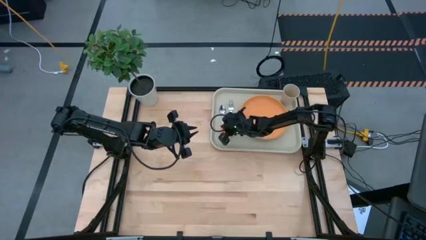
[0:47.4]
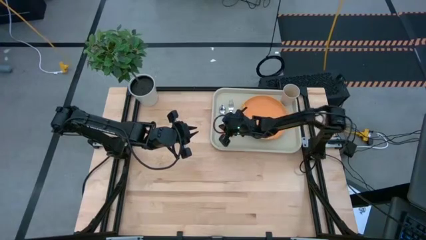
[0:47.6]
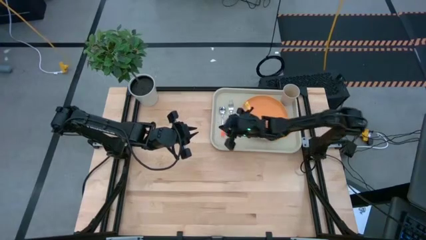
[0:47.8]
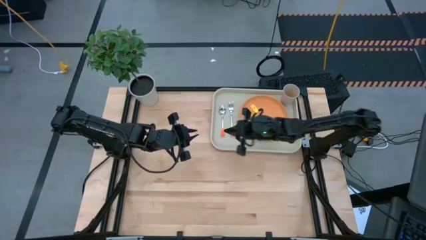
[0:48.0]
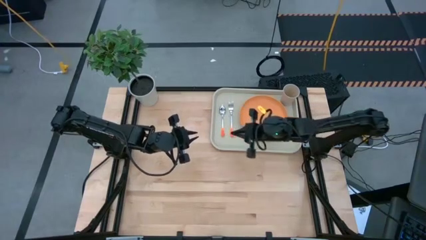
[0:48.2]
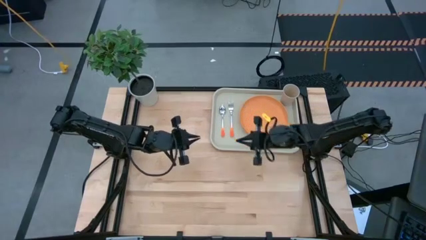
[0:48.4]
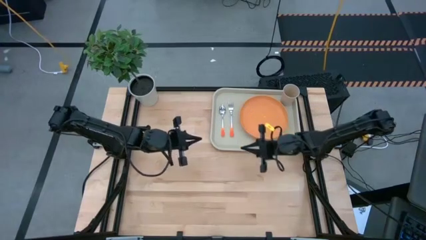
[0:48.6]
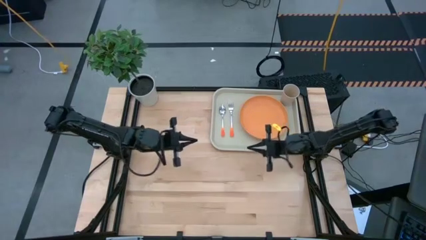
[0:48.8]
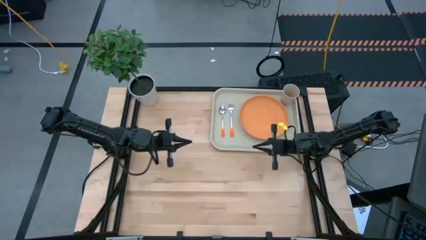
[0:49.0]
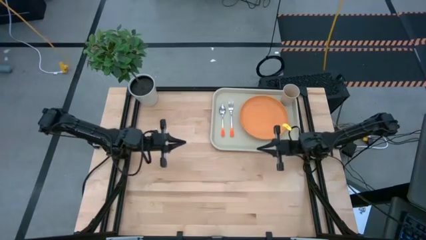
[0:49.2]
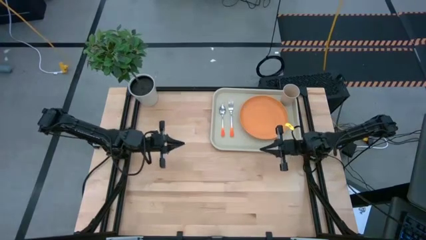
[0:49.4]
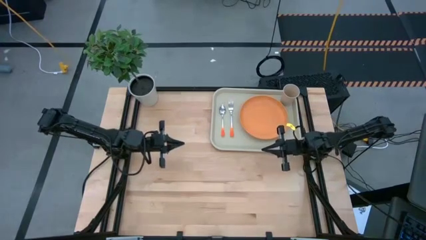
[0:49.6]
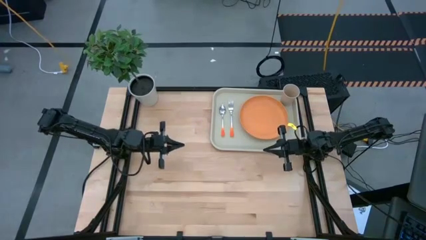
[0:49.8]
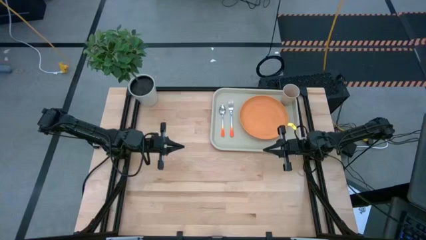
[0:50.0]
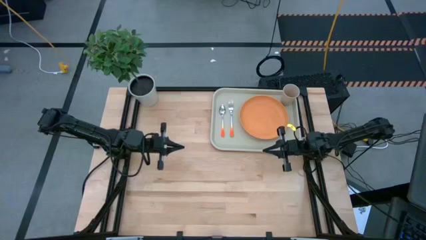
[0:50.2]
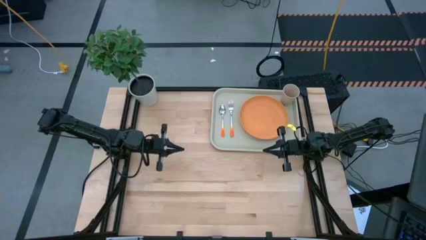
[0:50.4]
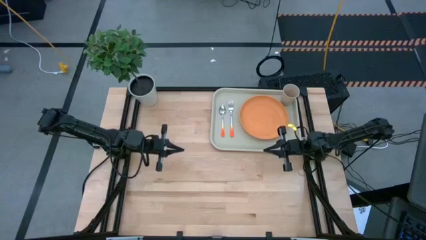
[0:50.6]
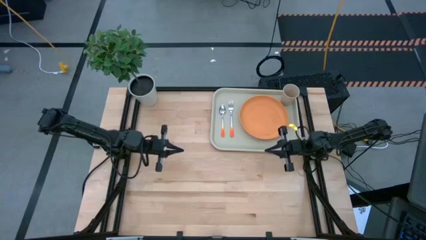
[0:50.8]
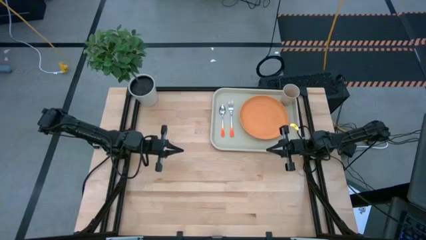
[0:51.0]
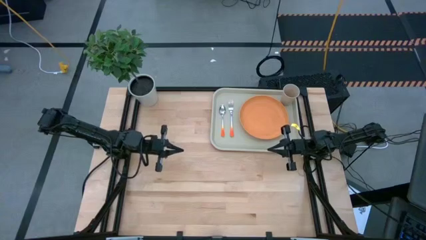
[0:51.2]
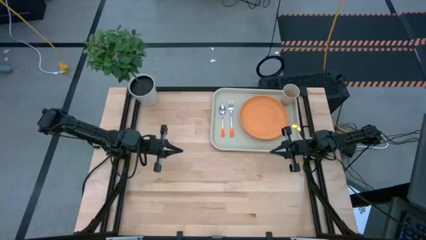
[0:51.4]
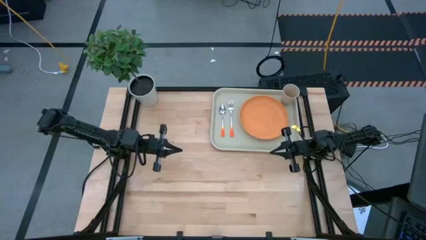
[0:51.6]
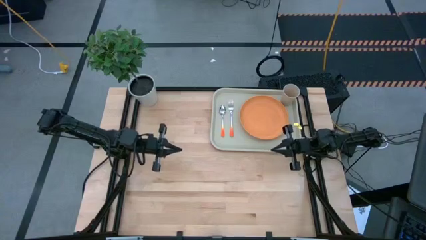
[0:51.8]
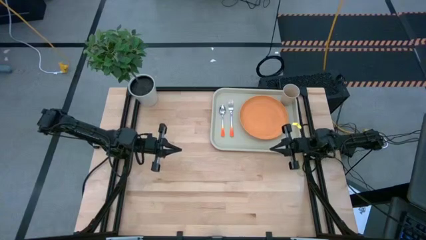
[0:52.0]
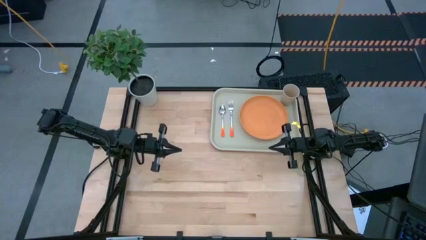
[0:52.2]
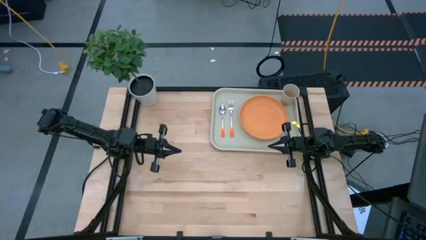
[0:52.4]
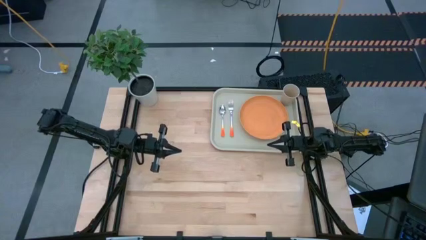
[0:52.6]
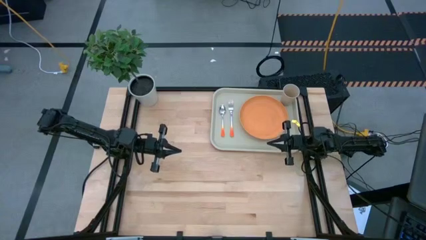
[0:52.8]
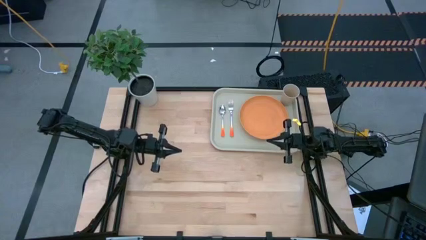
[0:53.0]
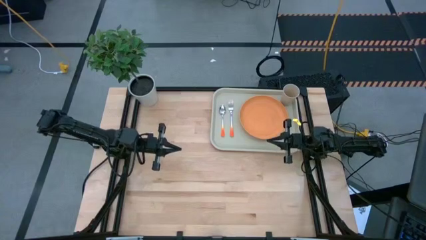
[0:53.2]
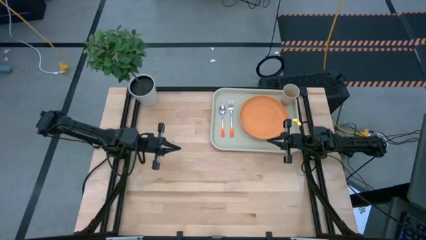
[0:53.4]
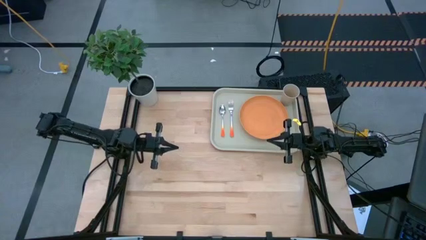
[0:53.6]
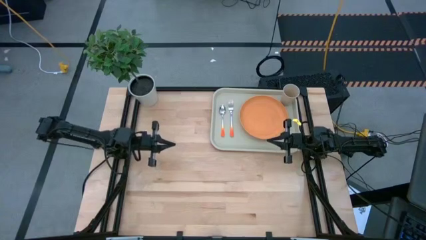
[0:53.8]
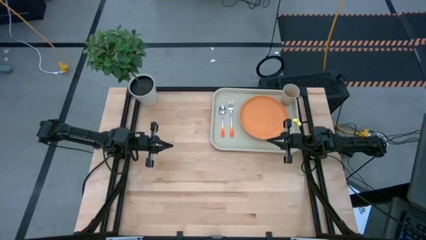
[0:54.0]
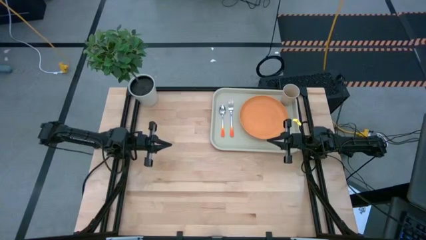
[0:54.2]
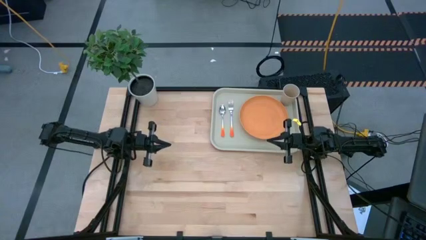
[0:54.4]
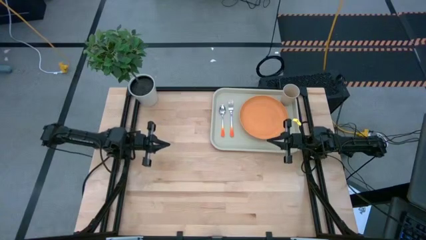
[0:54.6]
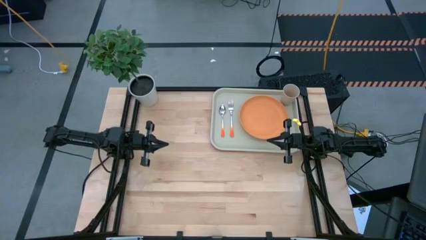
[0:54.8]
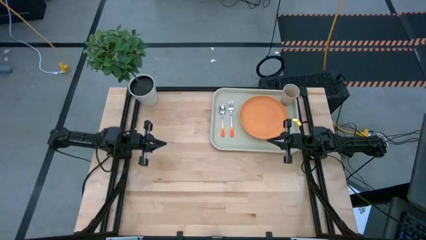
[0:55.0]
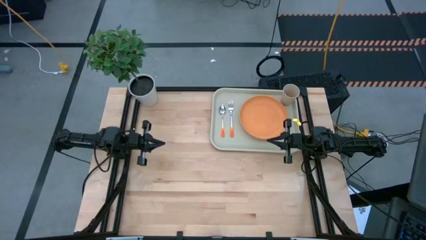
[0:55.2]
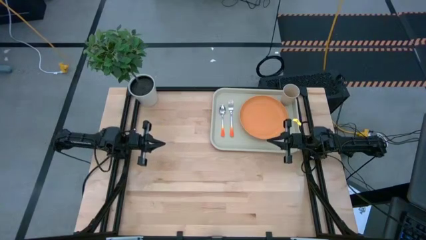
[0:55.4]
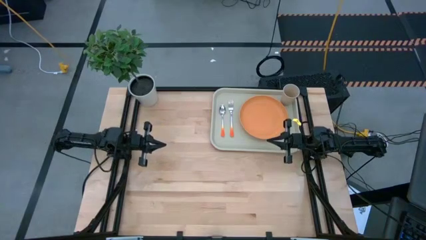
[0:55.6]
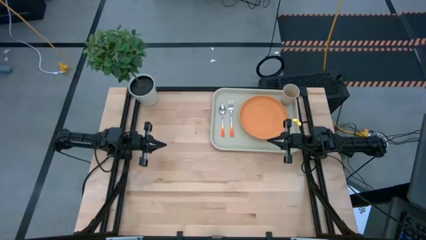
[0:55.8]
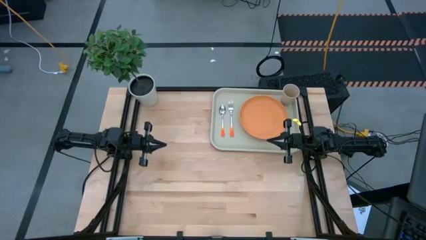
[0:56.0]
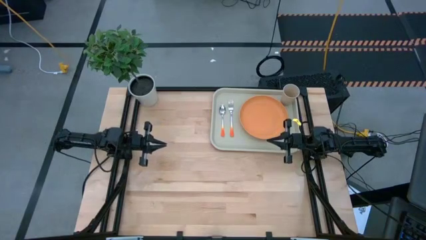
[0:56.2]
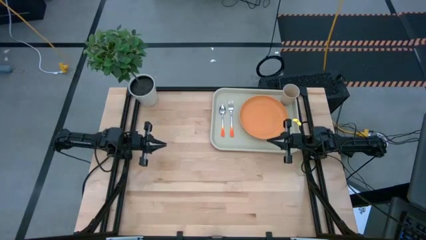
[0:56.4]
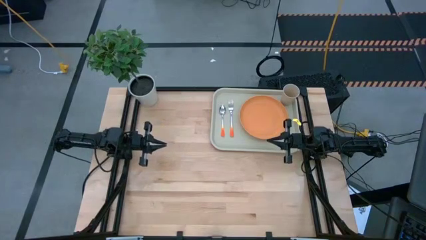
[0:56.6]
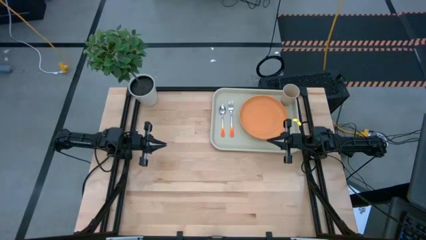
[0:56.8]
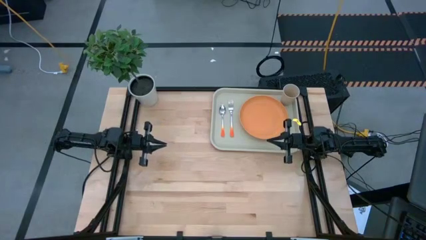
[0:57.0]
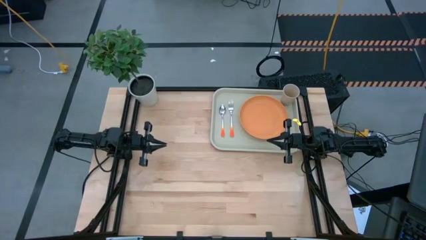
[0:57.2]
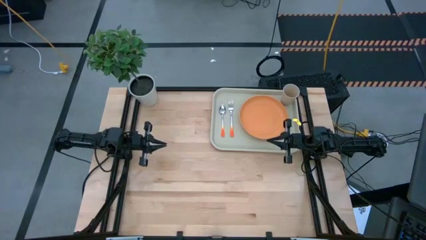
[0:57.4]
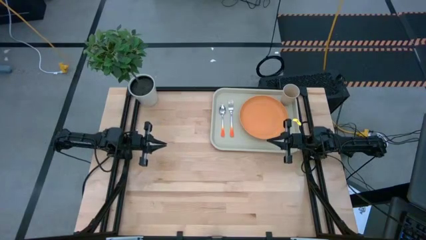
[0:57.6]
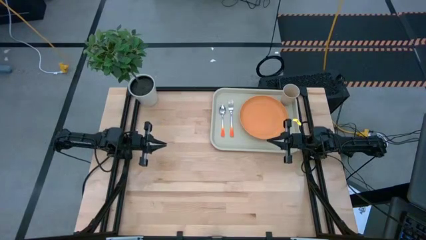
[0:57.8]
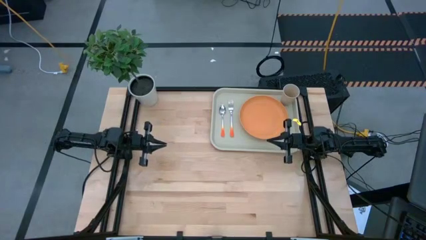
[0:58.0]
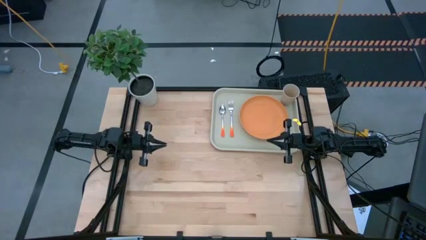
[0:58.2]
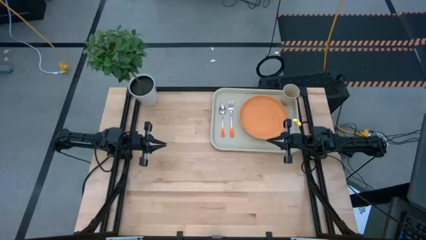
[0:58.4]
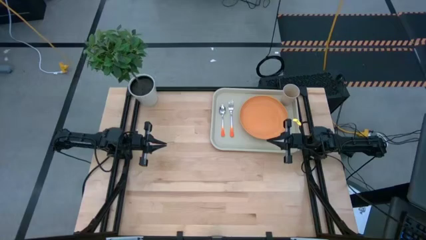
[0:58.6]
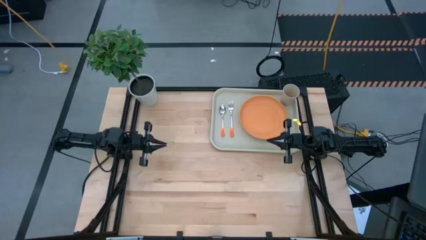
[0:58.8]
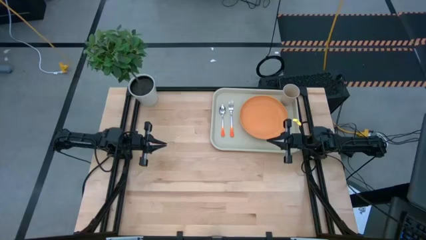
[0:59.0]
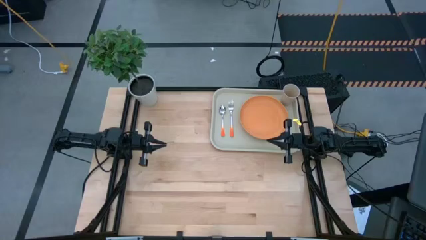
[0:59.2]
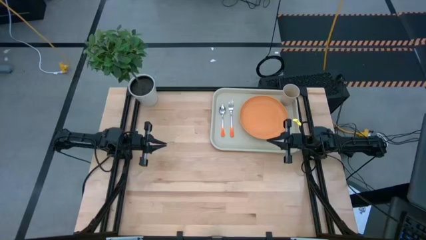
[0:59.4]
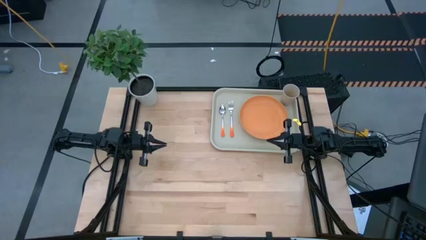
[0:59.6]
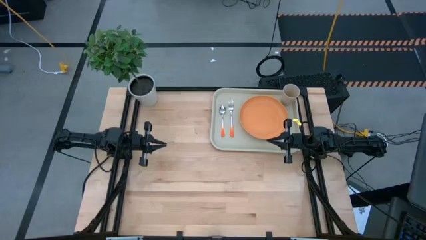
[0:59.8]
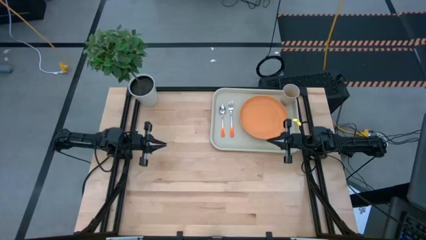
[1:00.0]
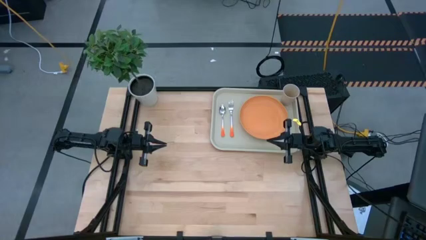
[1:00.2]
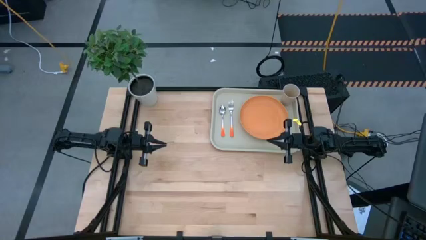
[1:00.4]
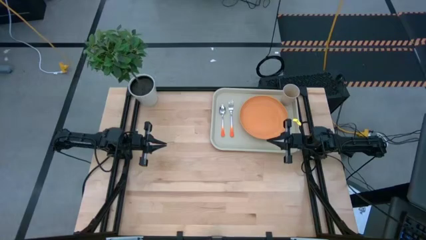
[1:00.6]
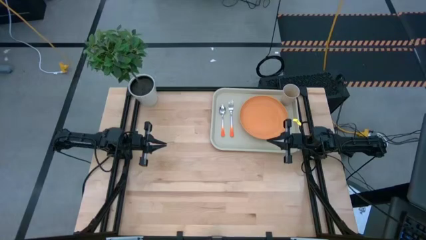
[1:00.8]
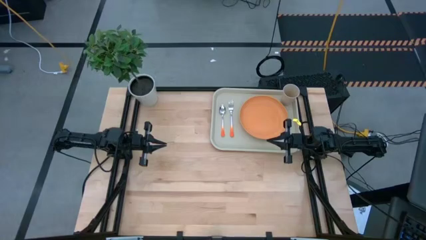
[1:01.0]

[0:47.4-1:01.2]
Task: Pick and place plate/cup/fork/spoon on tray
Return to Home Position
